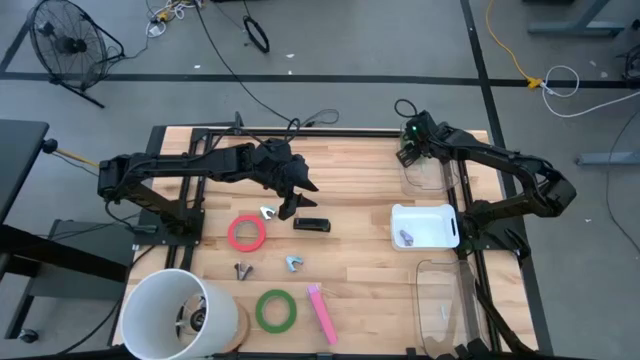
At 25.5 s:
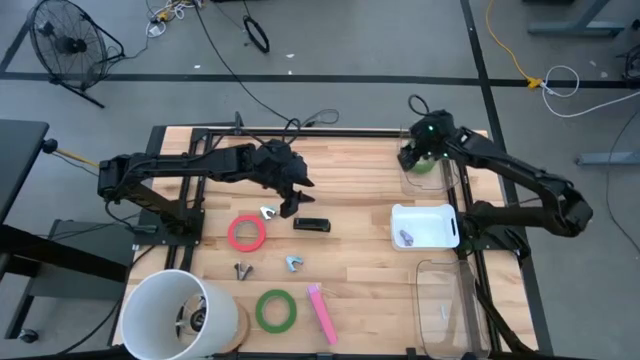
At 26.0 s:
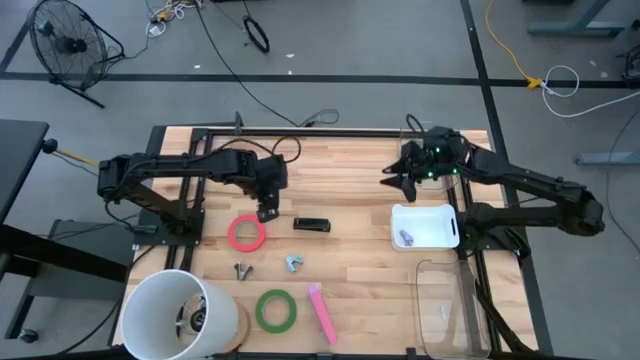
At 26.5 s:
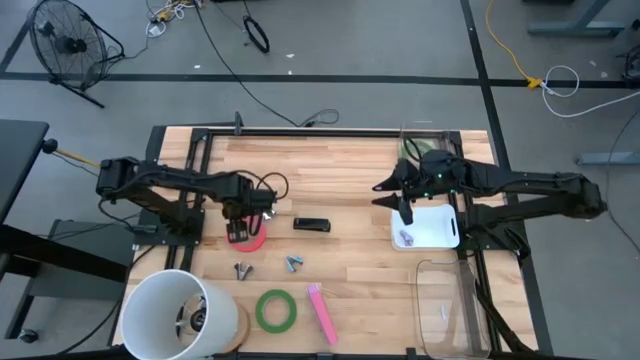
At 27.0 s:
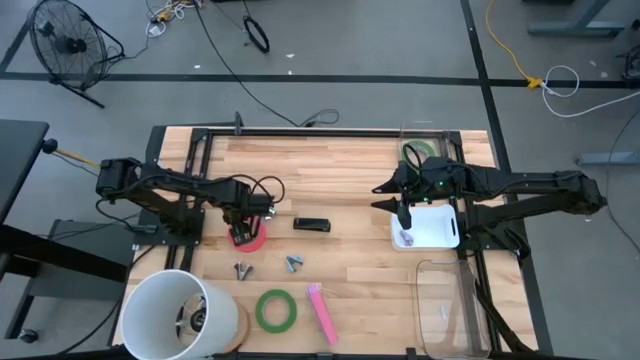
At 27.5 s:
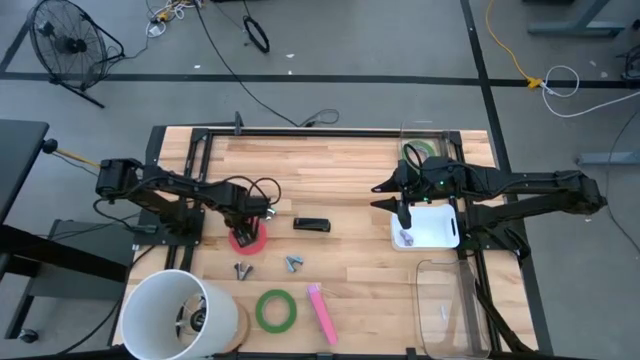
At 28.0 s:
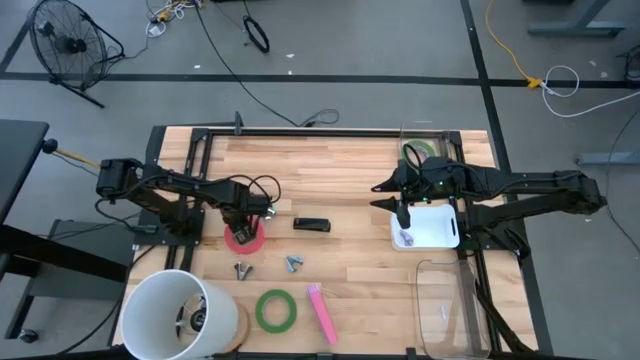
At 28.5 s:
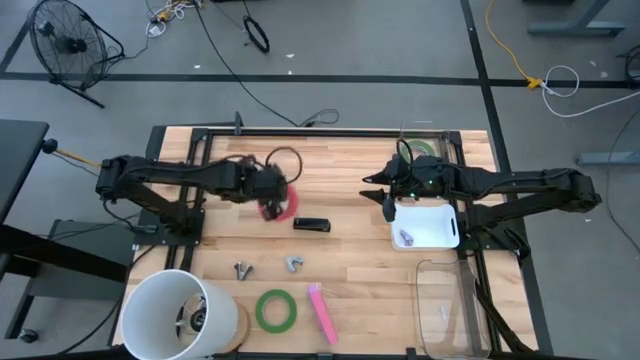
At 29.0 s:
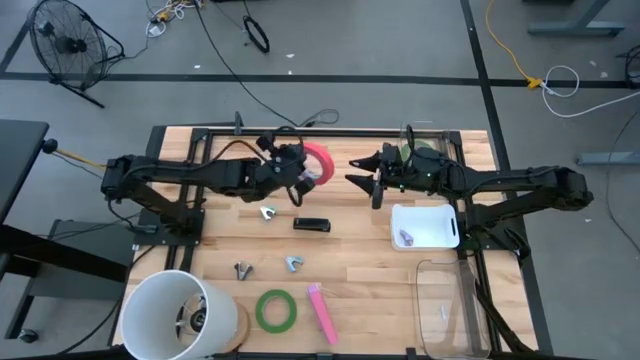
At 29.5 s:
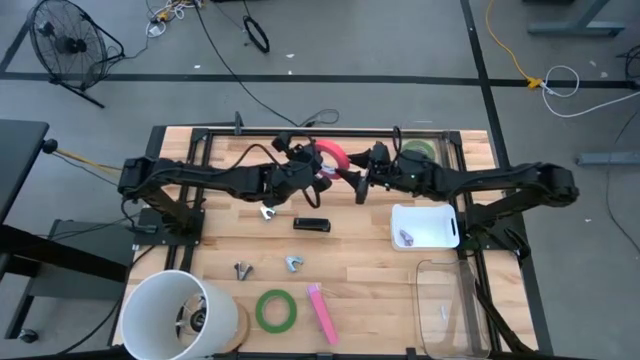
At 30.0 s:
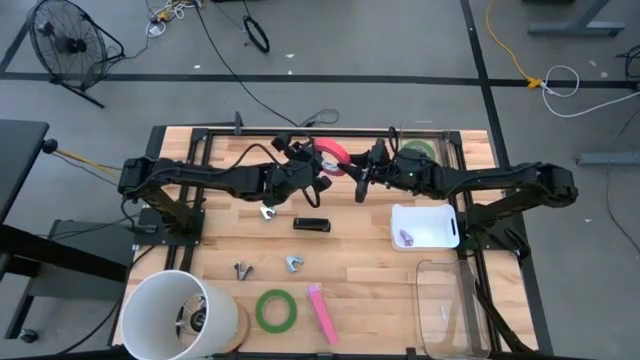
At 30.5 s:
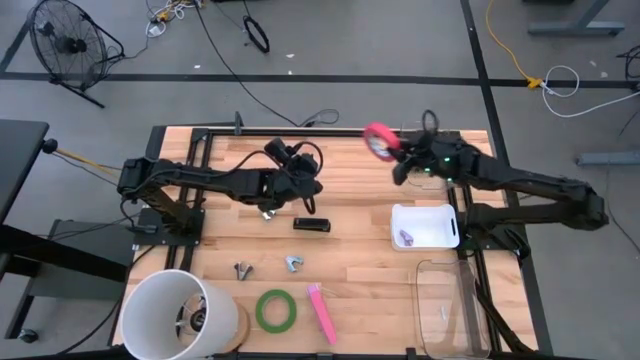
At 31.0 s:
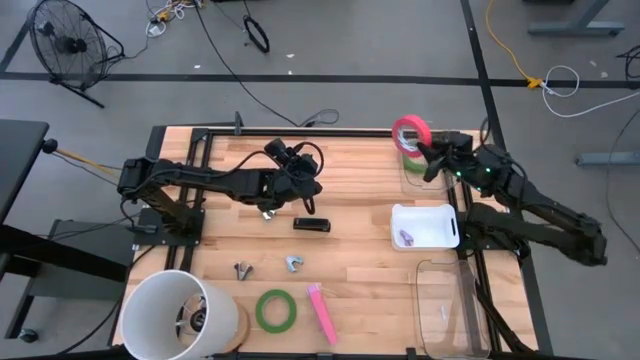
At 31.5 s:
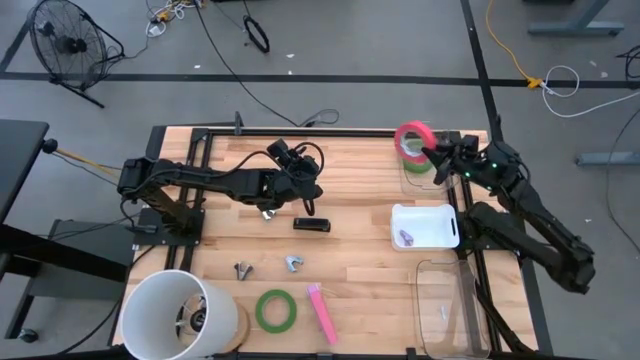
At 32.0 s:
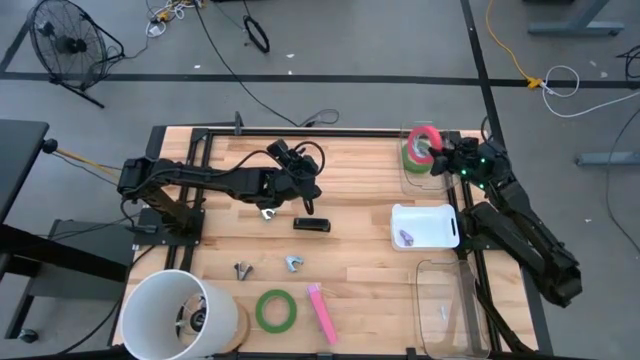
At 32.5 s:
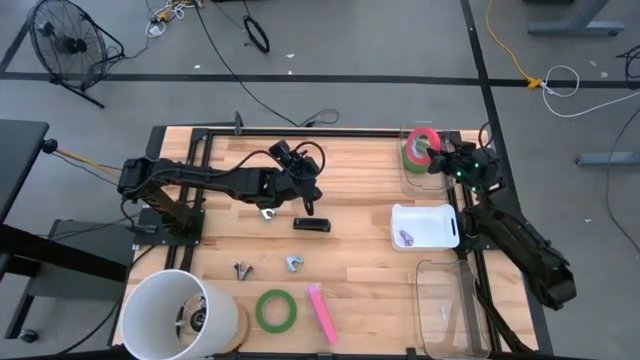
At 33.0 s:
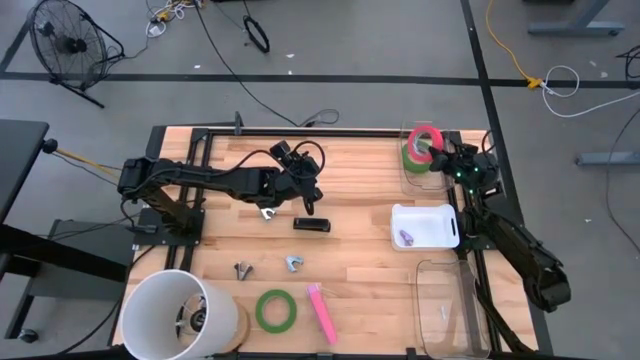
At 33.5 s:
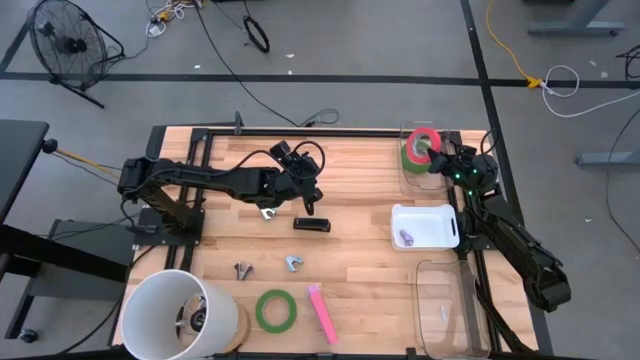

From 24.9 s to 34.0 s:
Task: Pick and place Stapler, Stapler remover, tape
Put the pink tape into the top transparent bin

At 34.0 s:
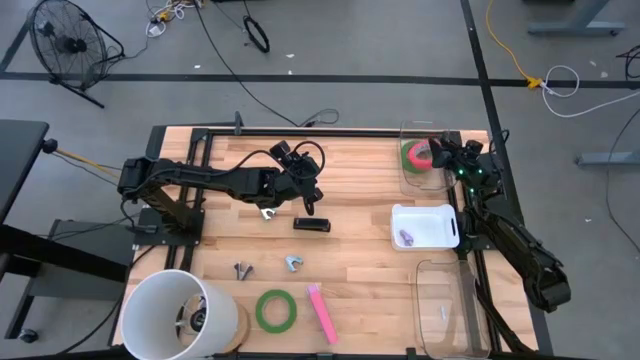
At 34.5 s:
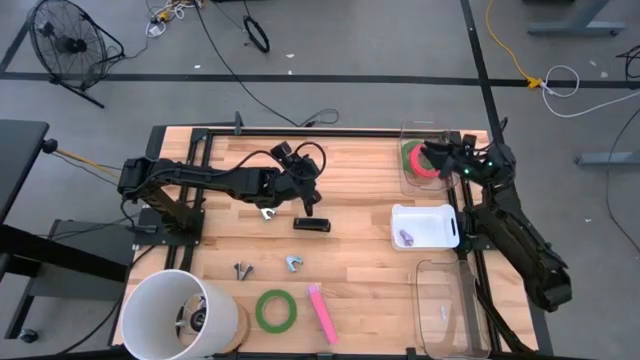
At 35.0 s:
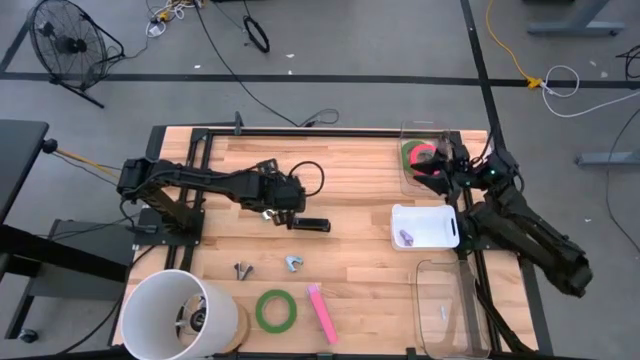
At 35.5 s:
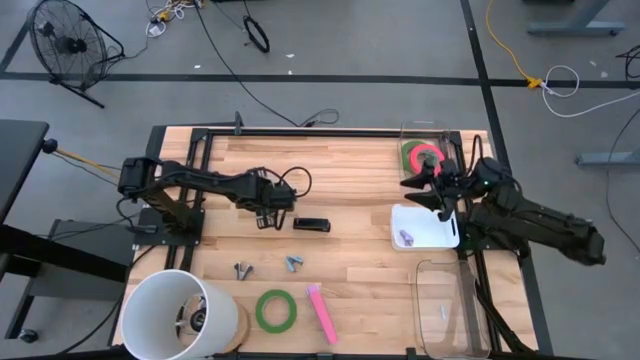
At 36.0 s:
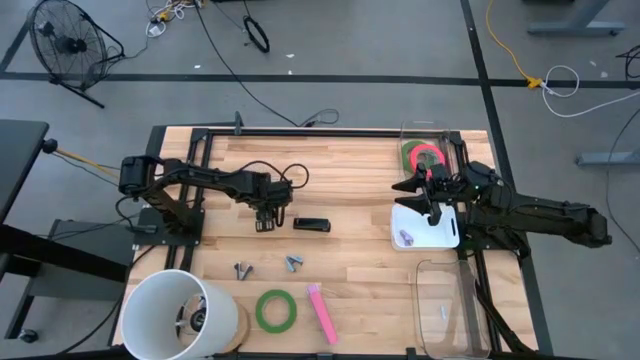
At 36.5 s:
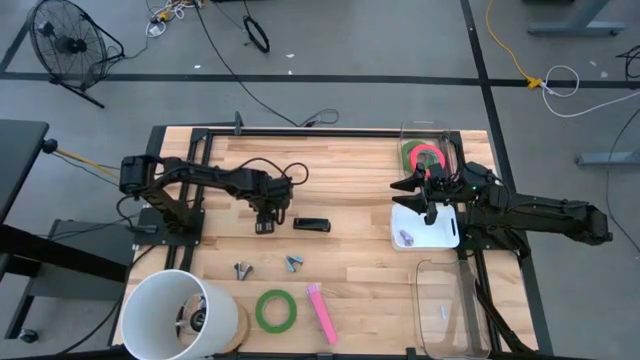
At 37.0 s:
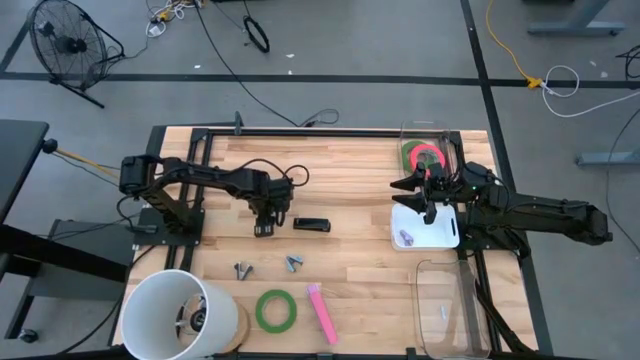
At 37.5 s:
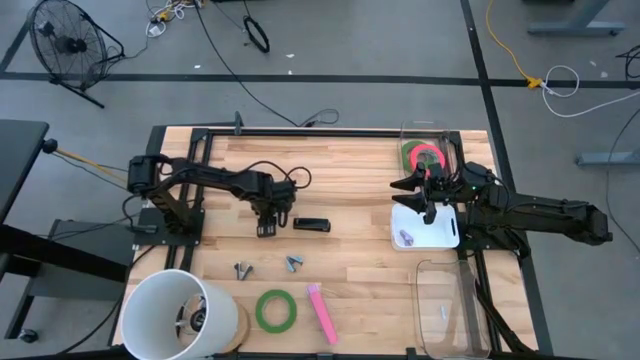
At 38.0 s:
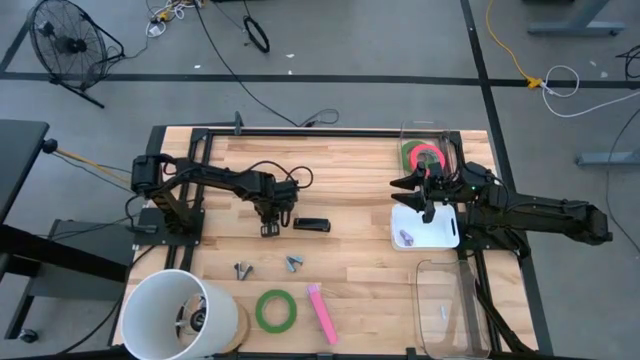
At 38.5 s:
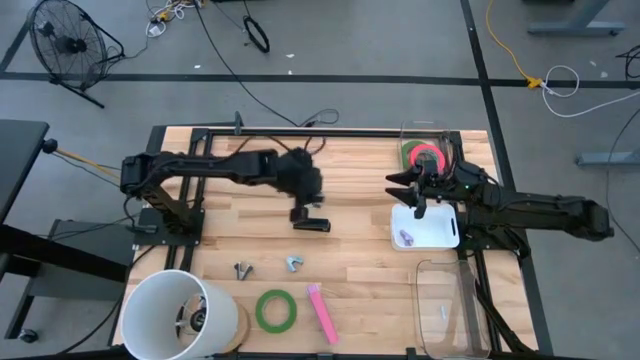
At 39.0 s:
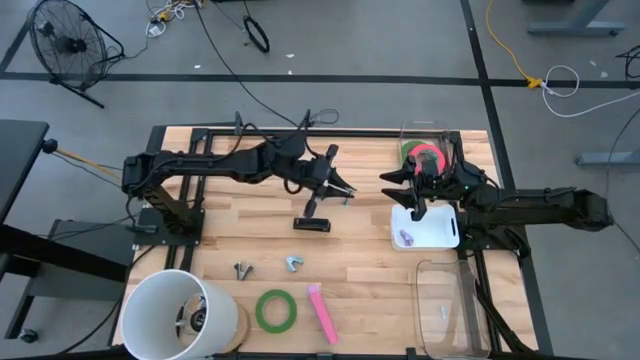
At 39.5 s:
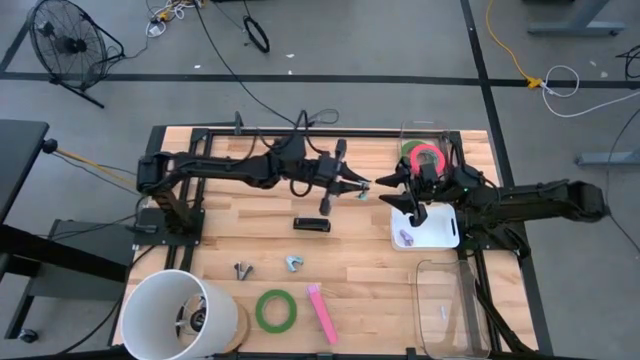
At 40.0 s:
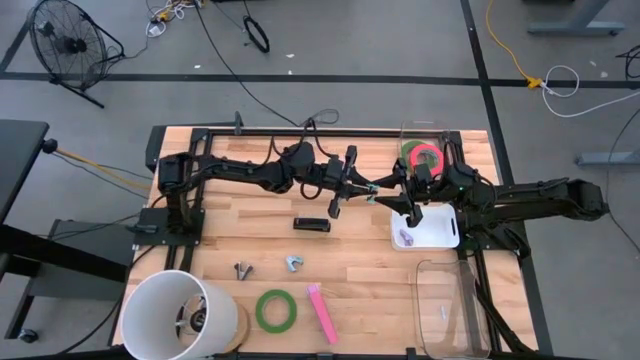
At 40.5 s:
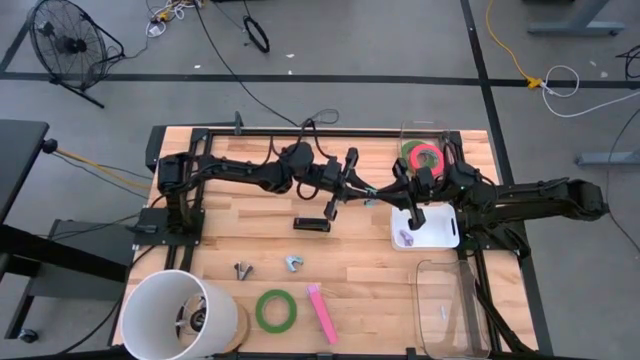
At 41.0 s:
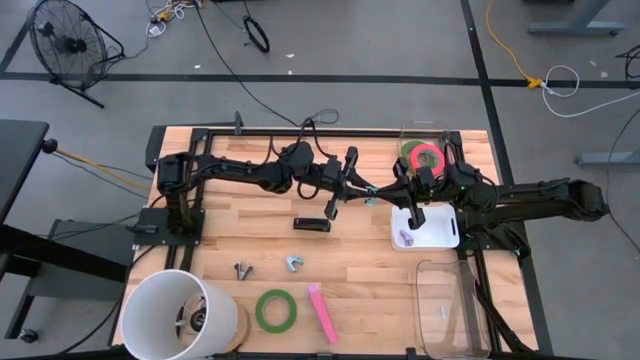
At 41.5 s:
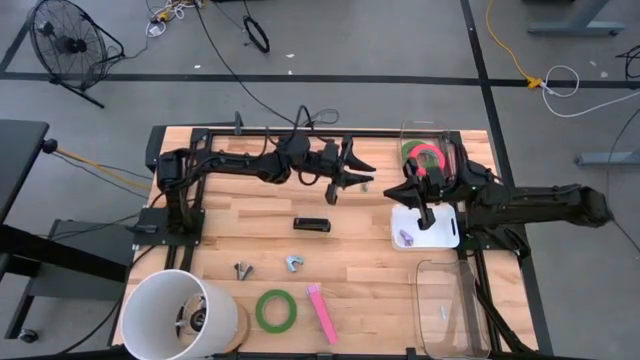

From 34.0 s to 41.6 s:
Put the blue staple remover into the white bin

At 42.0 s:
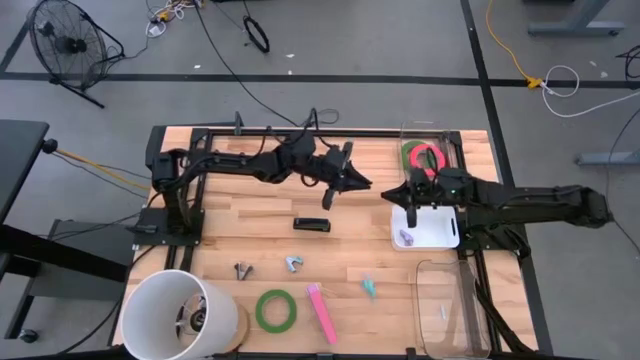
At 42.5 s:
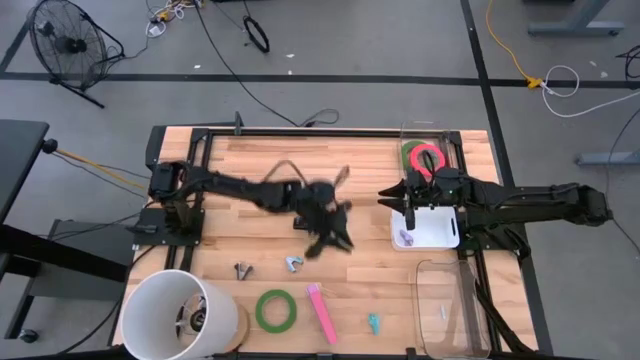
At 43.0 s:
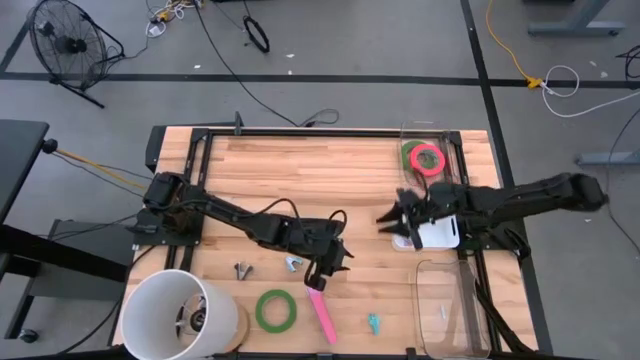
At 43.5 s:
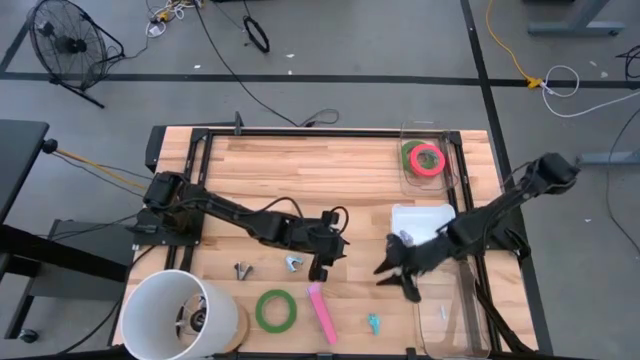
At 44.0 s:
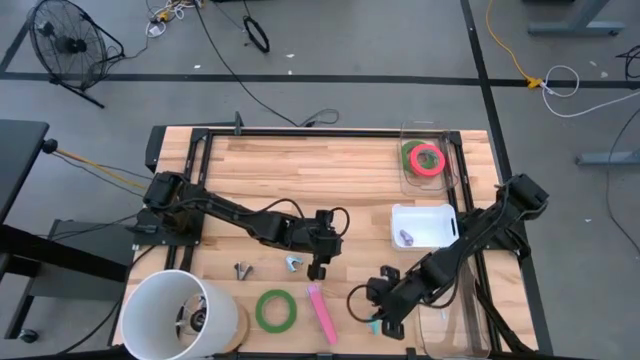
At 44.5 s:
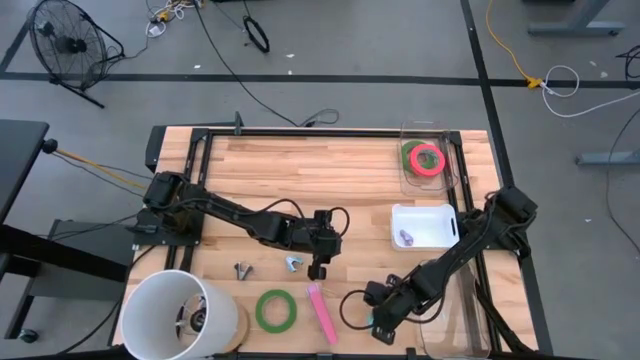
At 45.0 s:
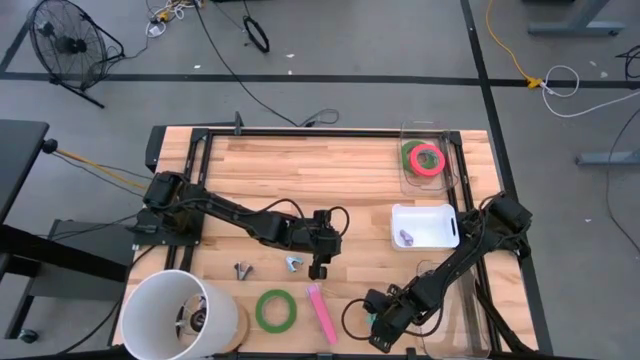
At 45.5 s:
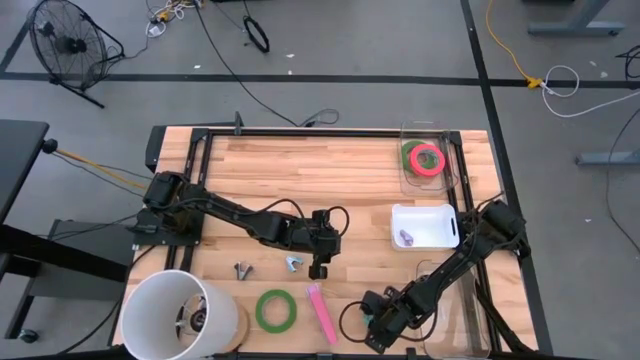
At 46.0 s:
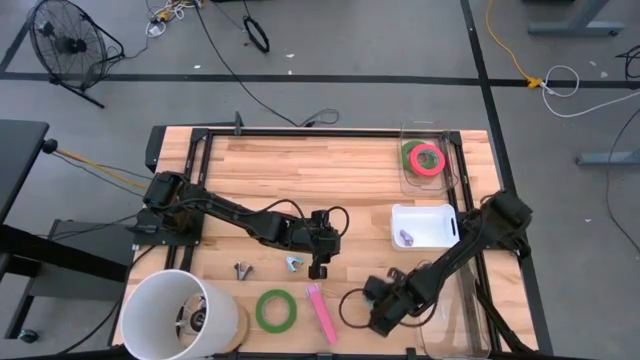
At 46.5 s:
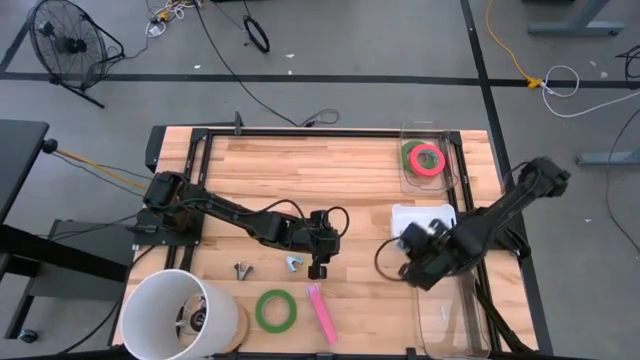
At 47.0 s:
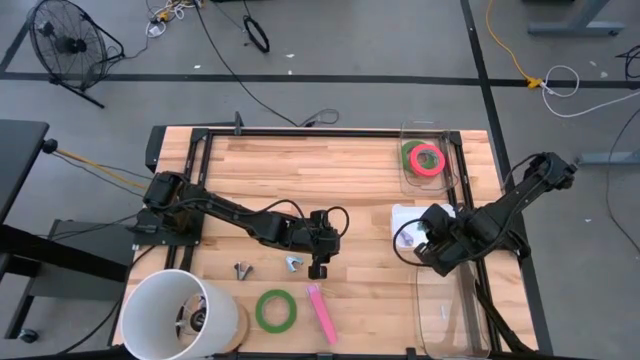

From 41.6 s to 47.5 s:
Put the blue staple remover into the white bin
